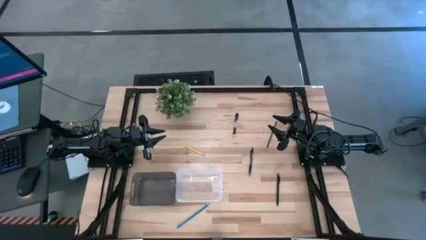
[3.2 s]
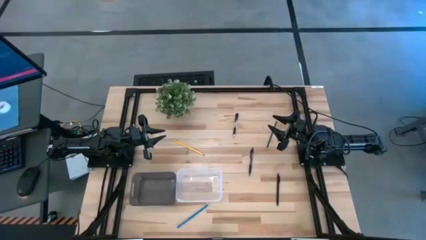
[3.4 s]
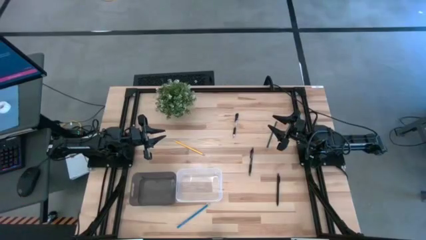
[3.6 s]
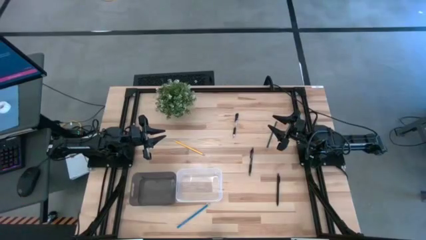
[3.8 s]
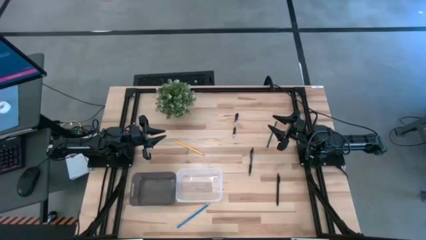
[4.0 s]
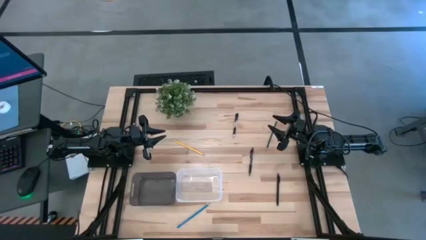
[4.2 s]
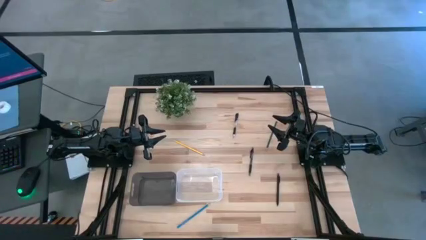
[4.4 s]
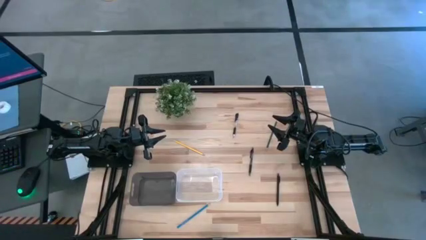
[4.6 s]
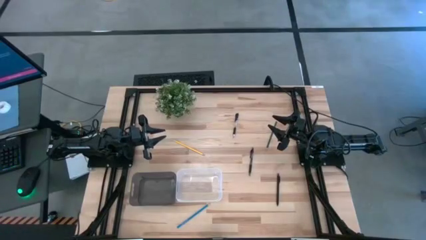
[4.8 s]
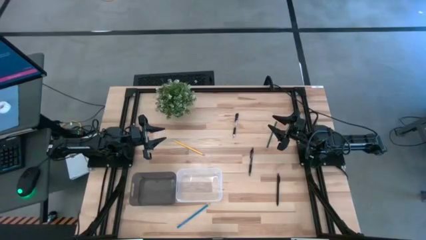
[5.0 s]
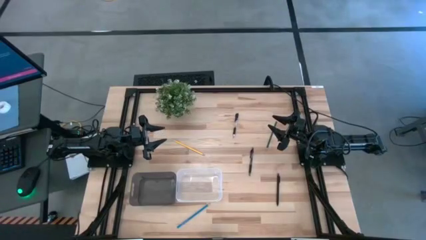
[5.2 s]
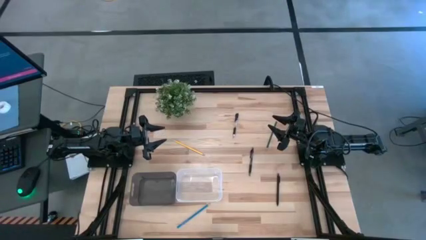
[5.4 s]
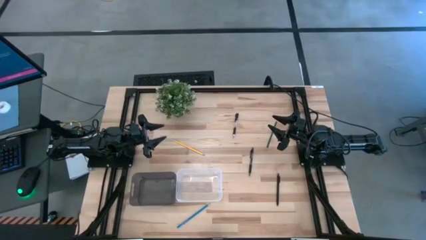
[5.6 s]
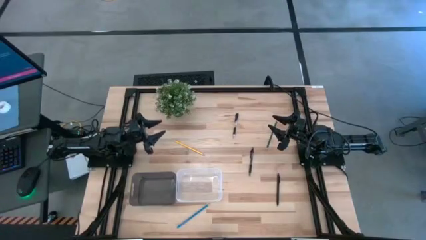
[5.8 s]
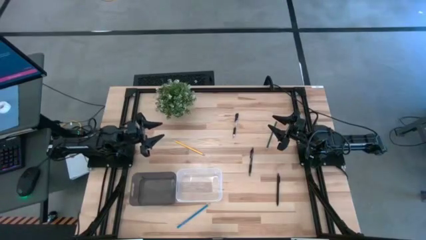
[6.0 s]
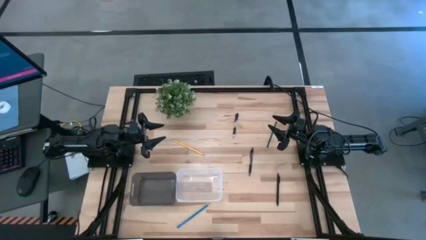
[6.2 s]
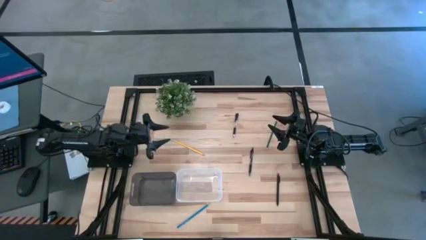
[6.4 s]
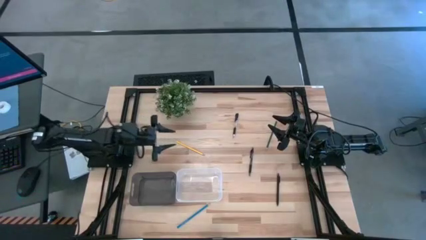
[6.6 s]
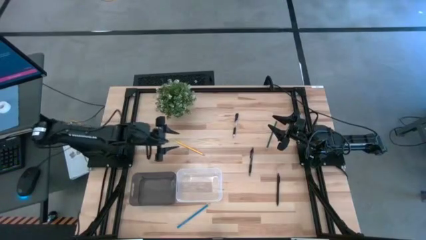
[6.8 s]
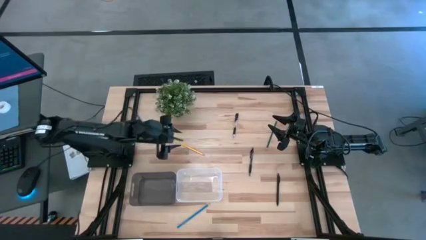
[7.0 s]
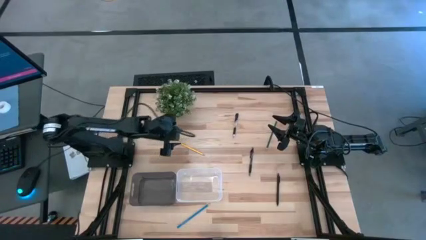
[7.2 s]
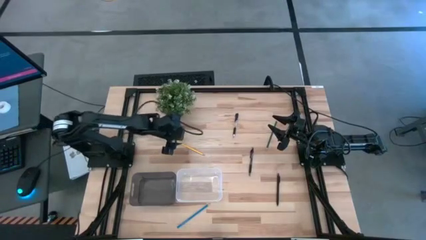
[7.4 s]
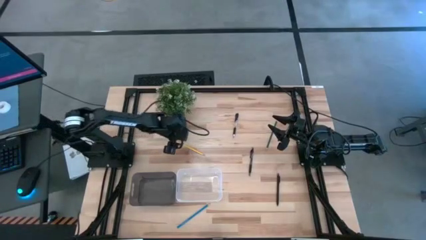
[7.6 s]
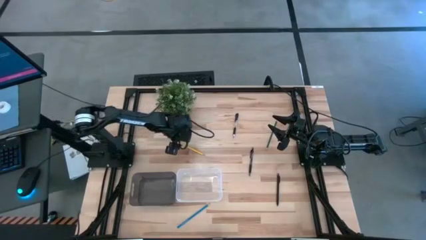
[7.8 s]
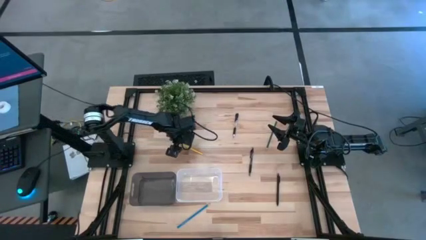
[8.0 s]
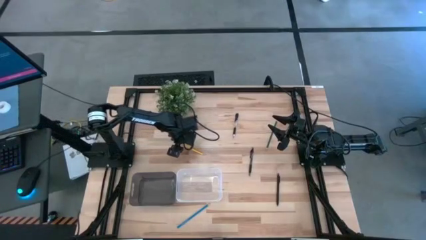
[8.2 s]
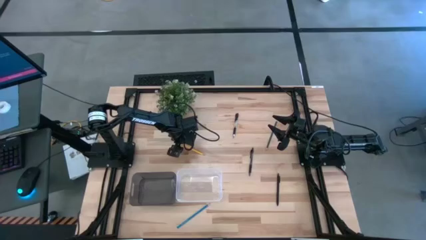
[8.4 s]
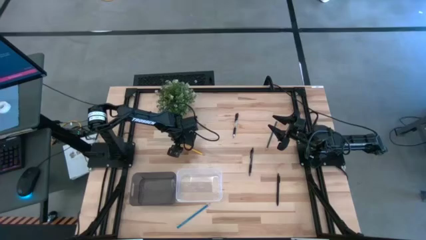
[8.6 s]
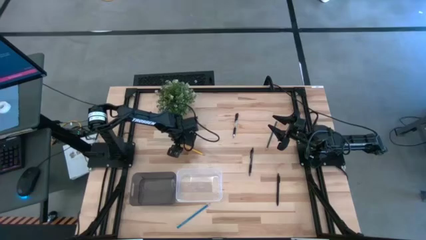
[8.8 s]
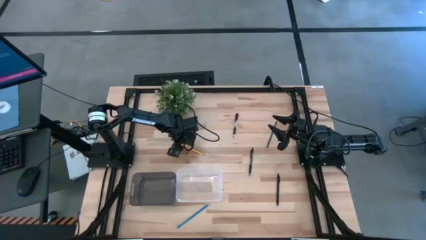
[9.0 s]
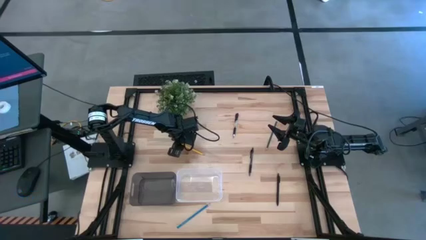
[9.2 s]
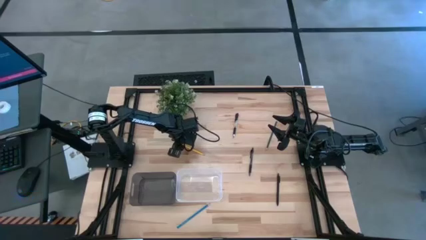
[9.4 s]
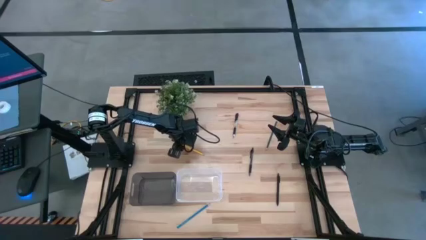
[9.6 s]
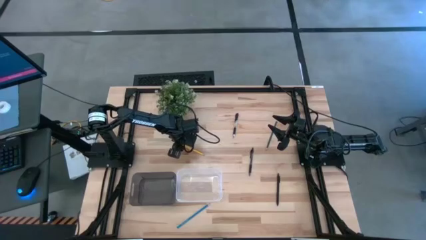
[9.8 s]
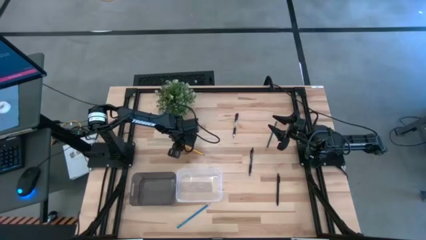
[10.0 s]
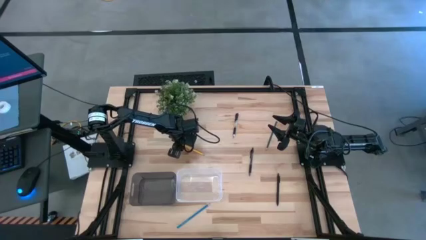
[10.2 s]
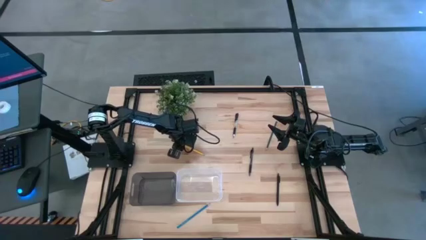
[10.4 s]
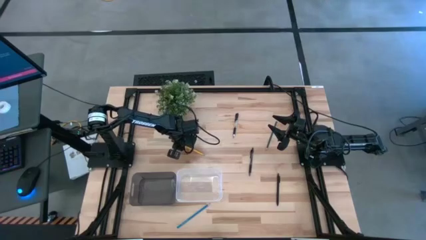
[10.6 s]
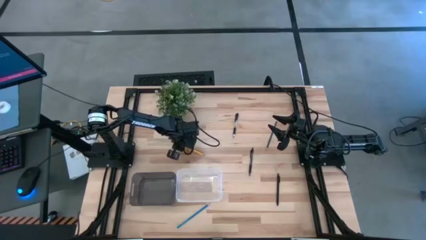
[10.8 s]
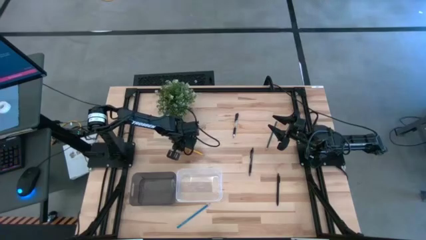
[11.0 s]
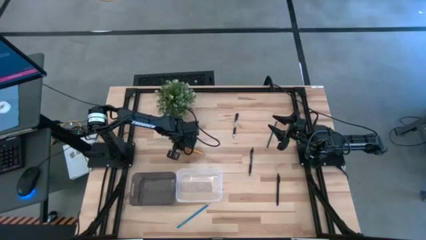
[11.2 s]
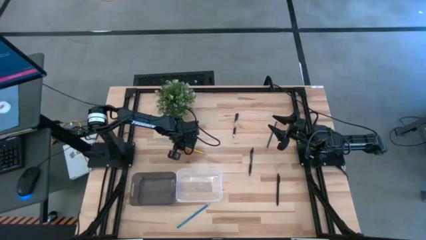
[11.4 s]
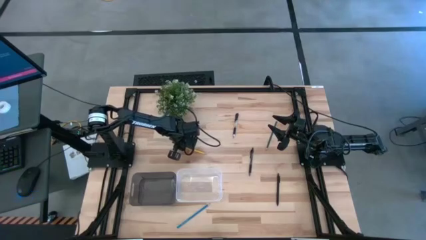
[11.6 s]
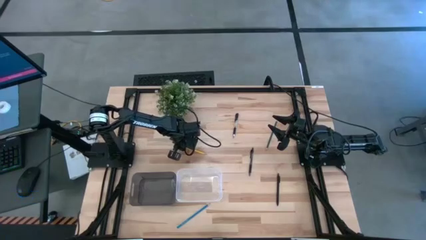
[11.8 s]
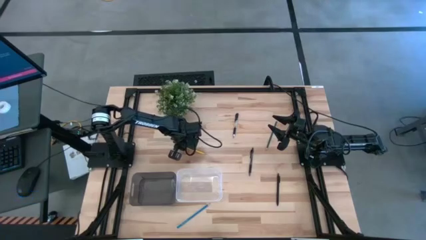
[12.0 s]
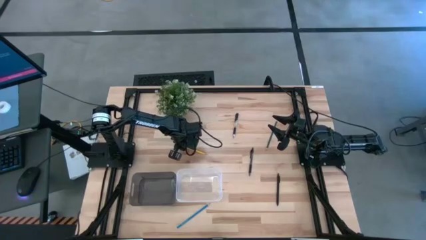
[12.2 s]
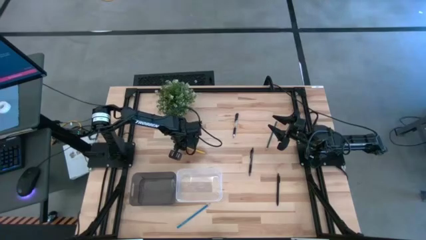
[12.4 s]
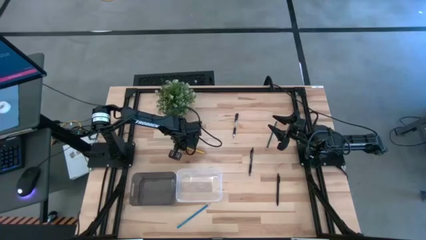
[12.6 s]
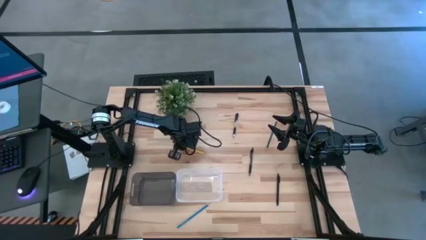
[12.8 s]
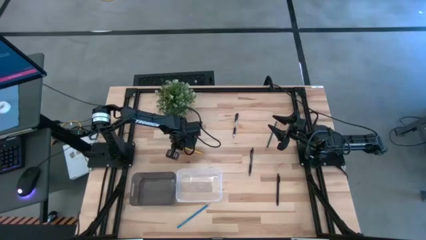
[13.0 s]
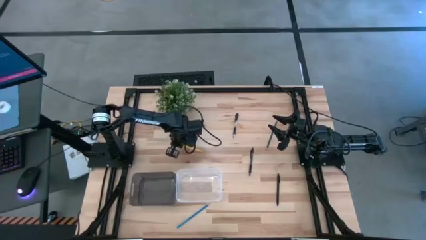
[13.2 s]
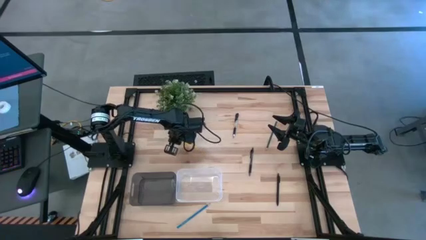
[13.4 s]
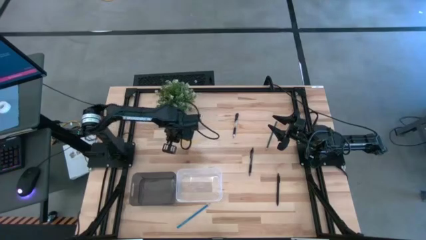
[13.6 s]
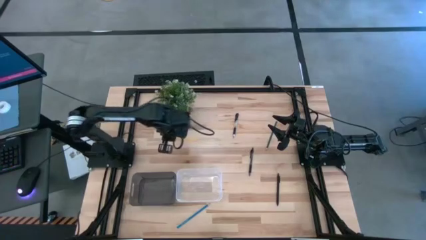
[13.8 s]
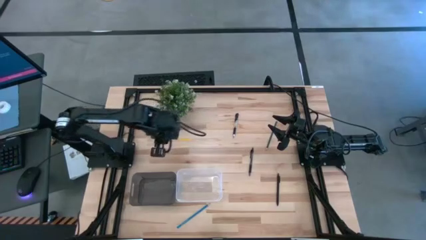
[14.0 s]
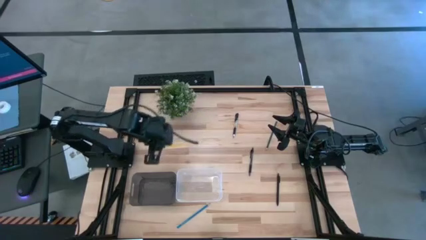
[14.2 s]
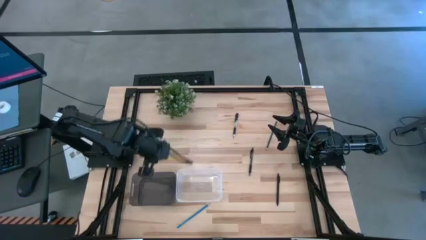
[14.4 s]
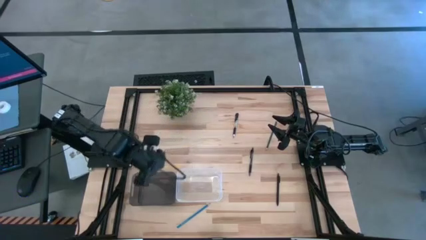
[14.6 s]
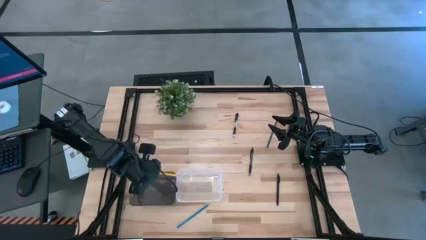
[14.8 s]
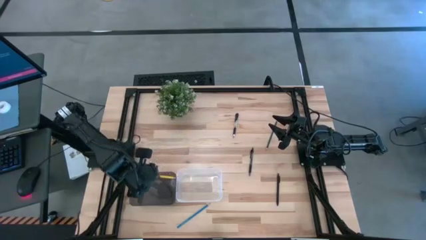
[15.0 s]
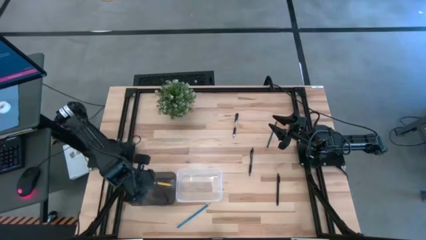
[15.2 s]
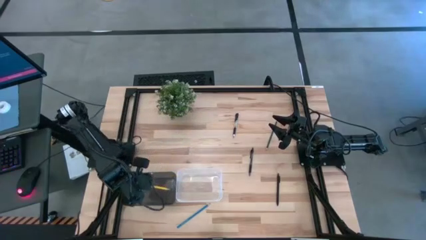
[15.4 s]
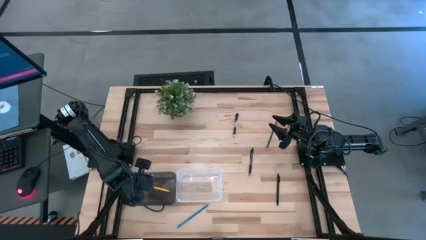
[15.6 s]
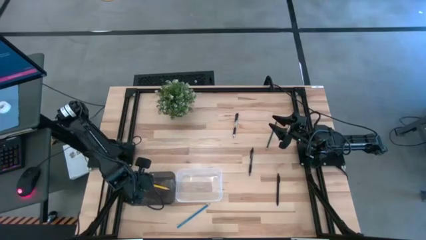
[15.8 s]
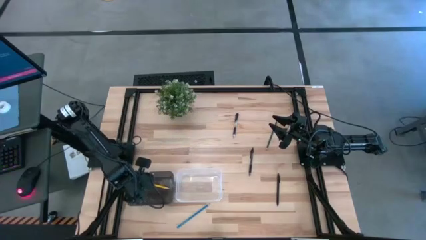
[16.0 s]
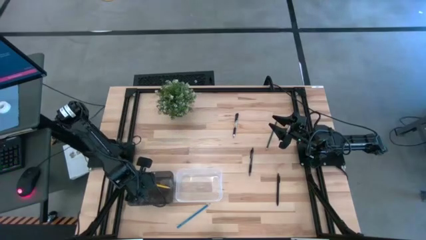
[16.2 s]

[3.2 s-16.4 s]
Task: Sort pens & pencils
Put the yellow pencil into the black bin
